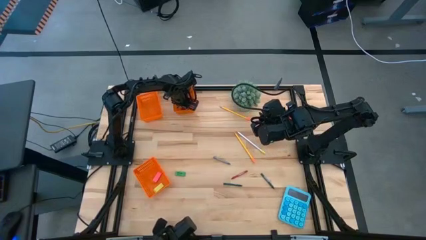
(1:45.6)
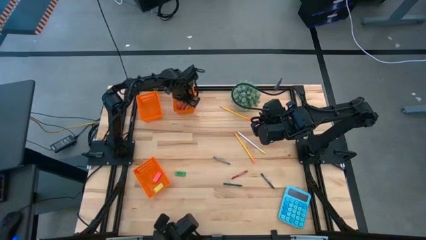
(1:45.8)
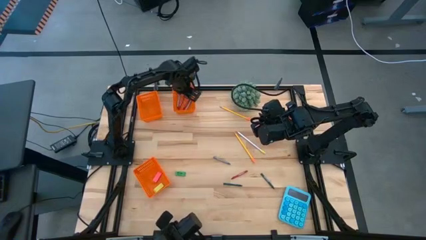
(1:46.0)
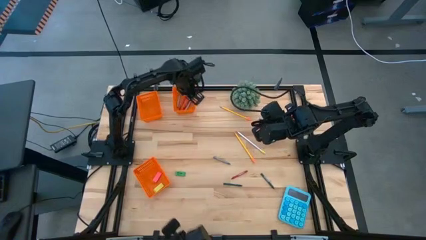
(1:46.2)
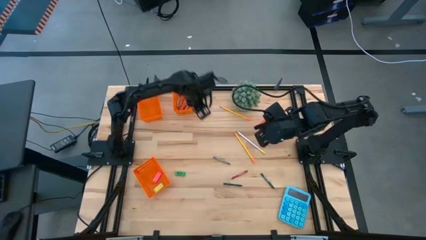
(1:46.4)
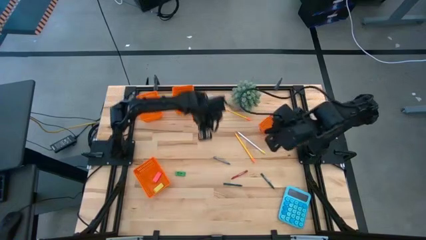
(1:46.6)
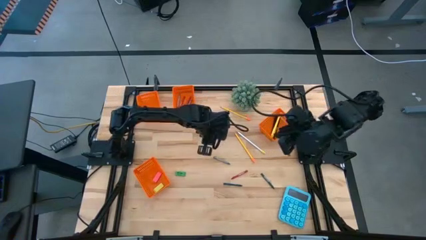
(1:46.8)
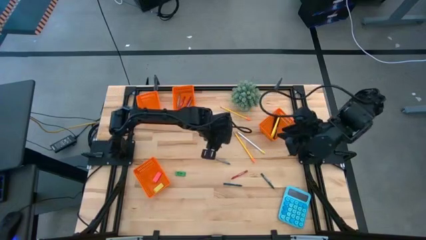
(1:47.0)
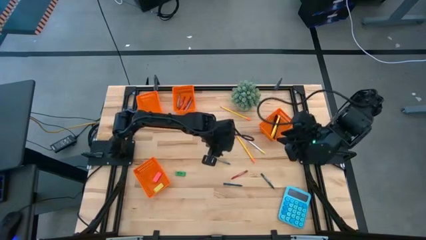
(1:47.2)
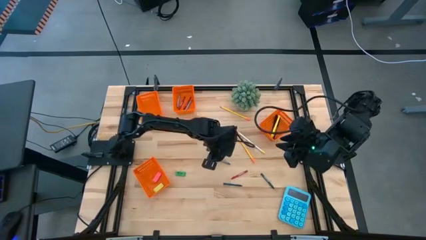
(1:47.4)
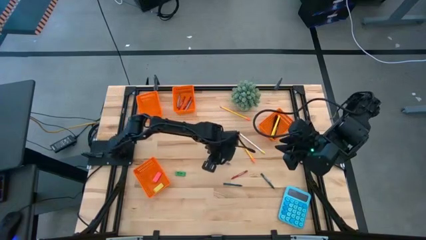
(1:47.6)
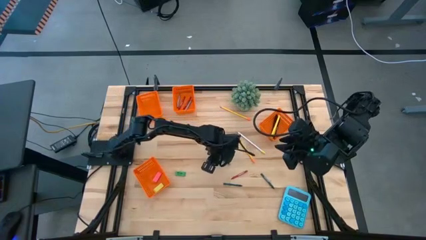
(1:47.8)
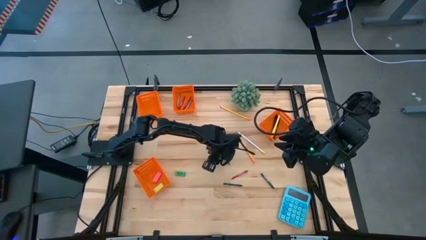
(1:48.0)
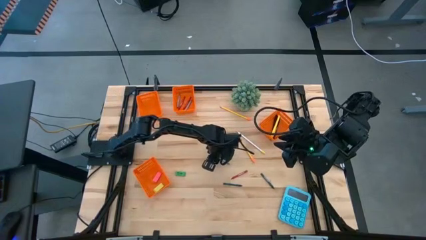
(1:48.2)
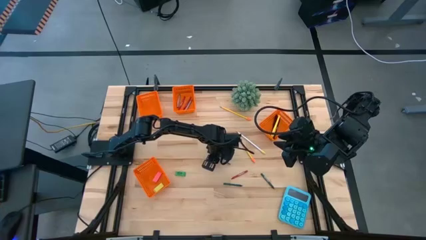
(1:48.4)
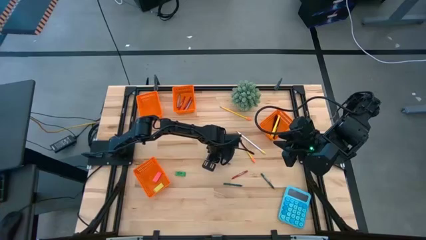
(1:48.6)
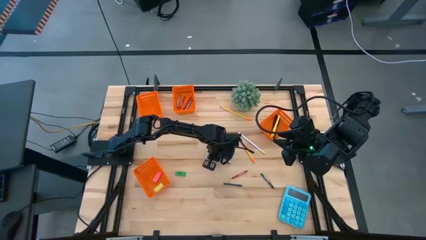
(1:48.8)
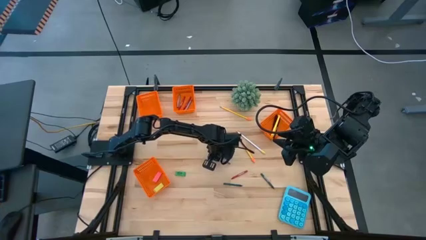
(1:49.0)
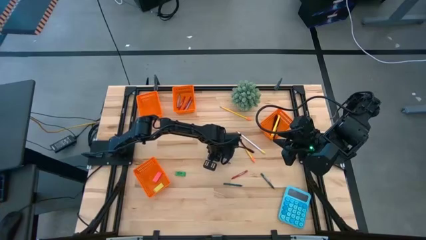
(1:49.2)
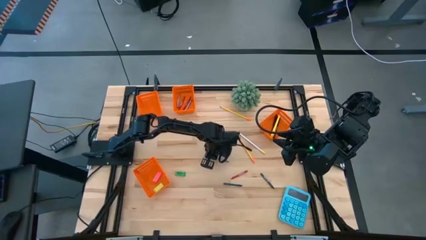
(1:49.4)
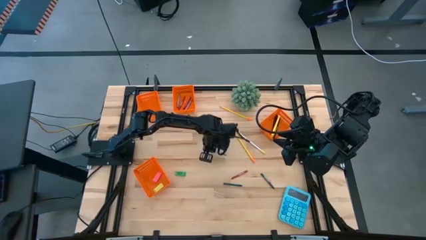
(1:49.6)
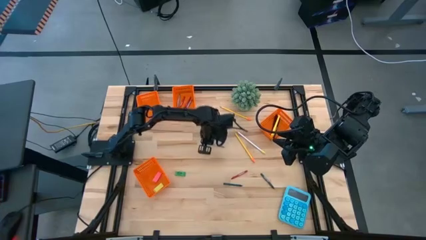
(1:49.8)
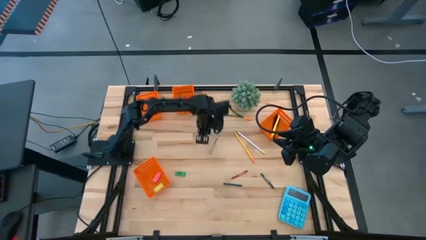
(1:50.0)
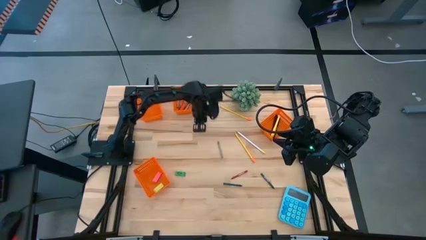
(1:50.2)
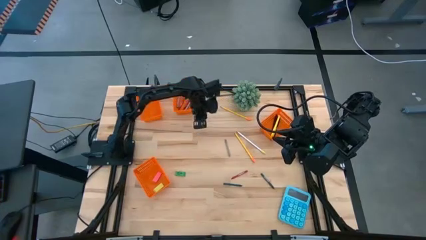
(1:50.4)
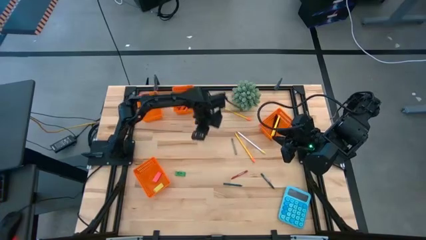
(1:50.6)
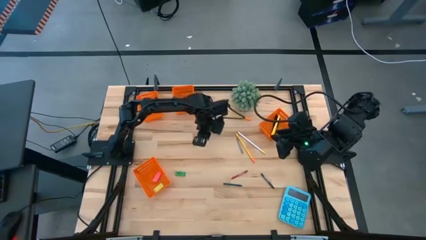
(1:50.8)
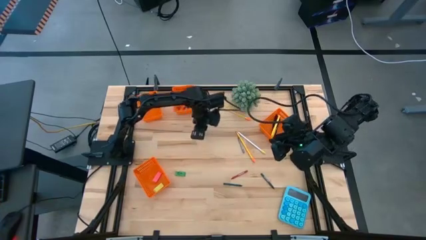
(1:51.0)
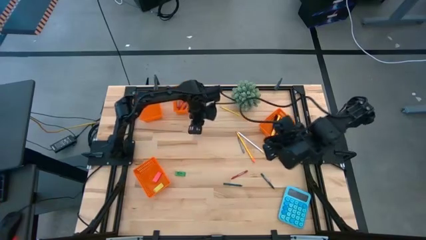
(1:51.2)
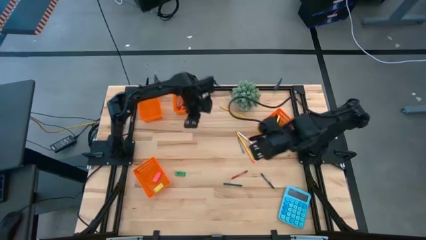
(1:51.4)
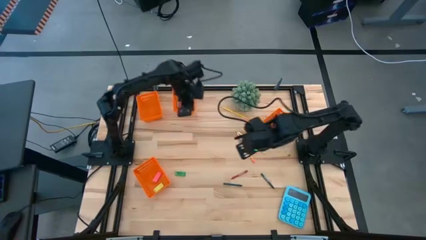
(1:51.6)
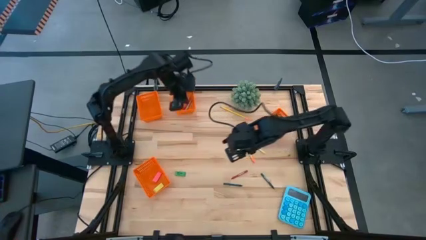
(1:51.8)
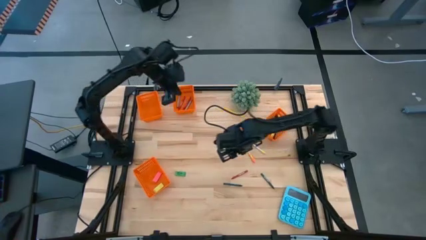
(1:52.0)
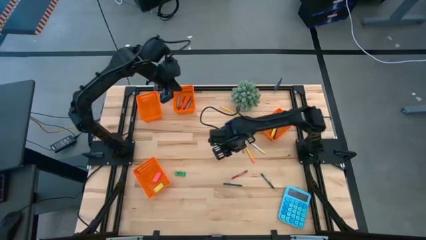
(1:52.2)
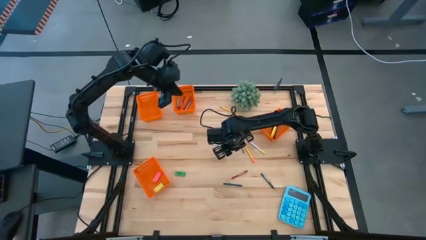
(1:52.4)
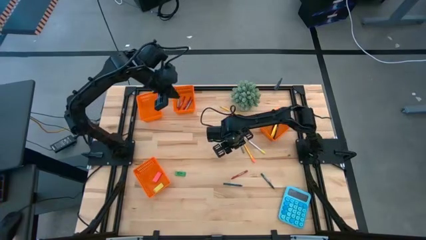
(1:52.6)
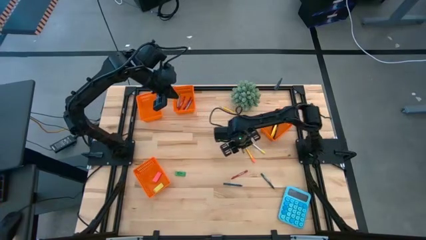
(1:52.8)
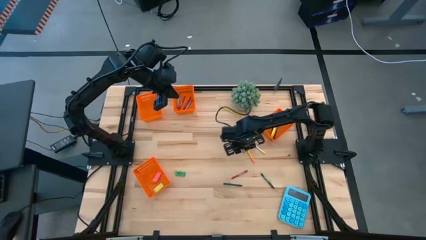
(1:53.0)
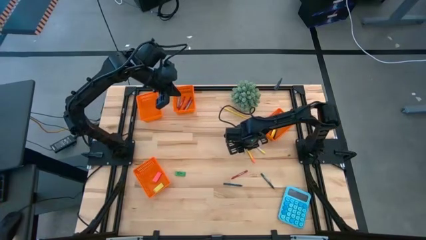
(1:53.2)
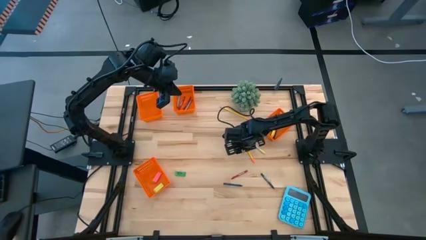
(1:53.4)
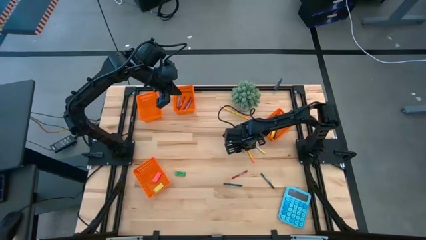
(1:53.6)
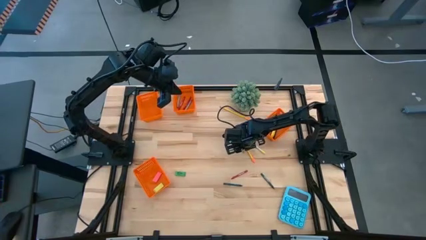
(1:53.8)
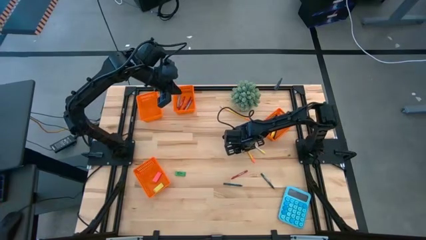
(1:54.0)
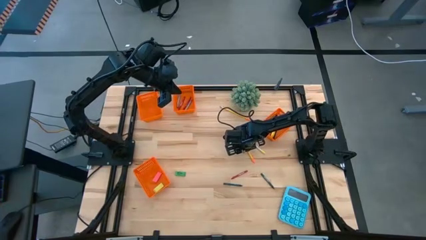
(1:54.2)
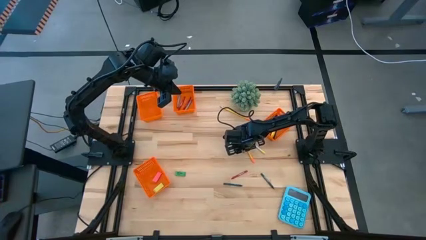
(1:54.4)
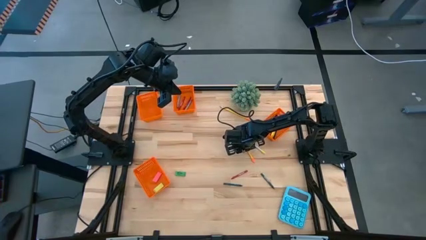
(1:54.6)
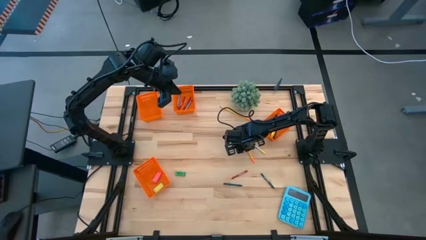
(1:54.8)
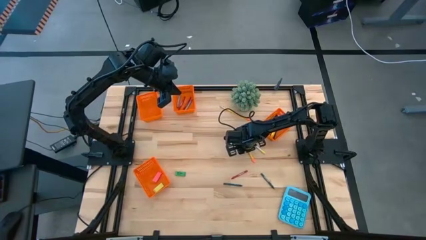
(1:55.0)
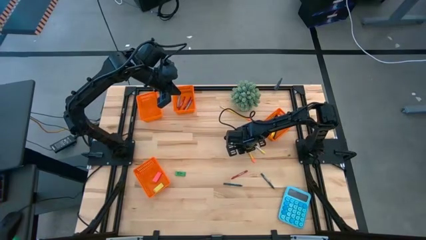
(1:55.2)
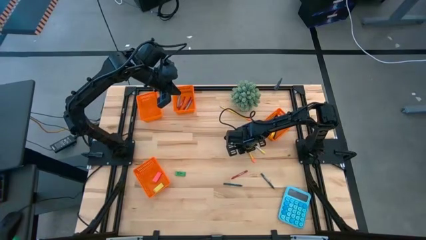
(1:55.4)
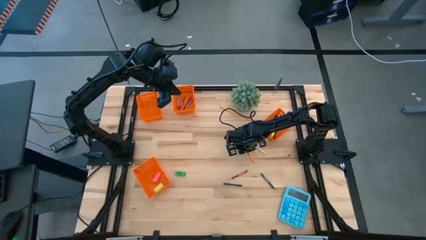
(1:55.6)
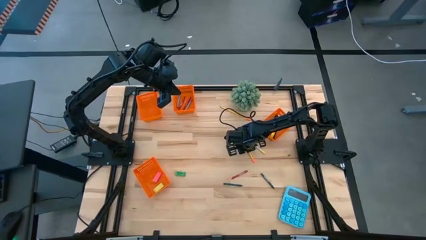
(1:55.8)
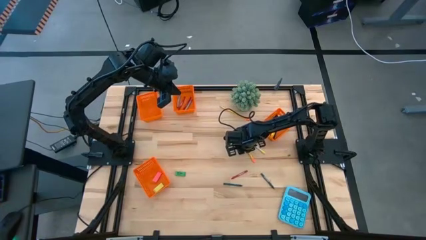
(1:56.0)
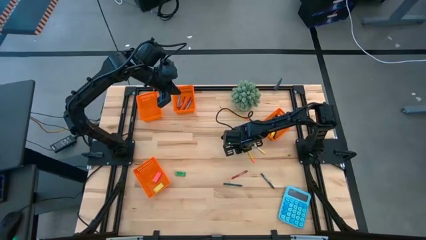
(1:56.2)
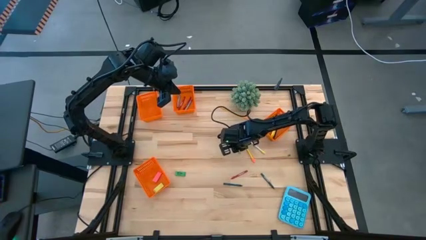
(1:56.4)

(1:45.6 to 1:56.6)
Task: Sort crayons/erasers/pens/pencils in bins
Put the gray crayon into the middle orange bin
